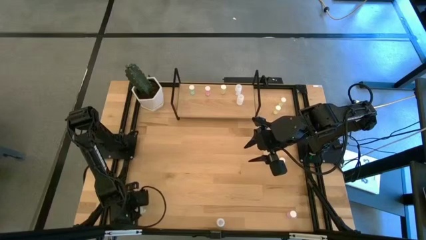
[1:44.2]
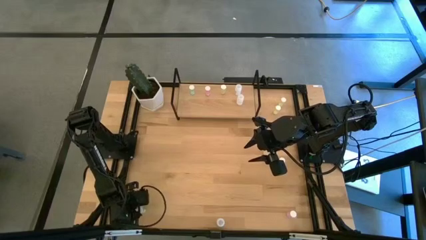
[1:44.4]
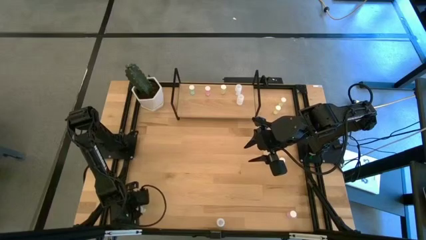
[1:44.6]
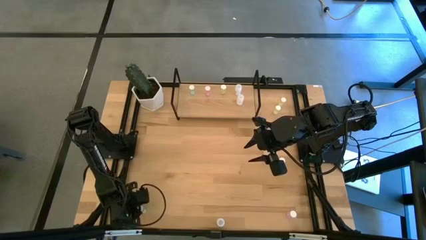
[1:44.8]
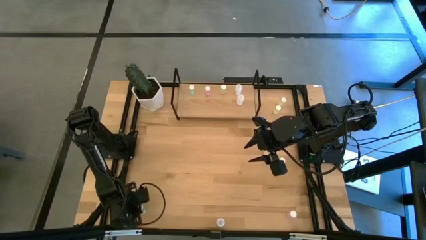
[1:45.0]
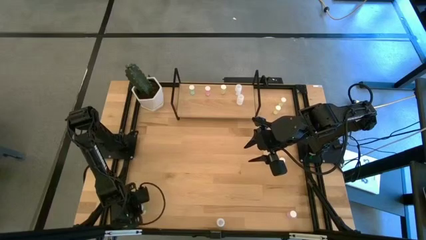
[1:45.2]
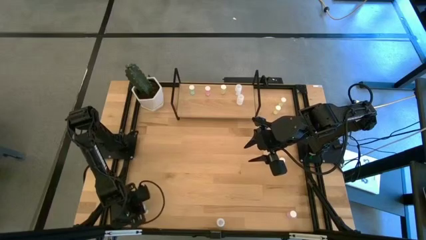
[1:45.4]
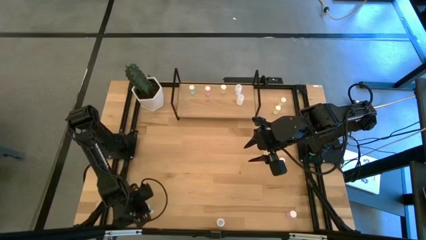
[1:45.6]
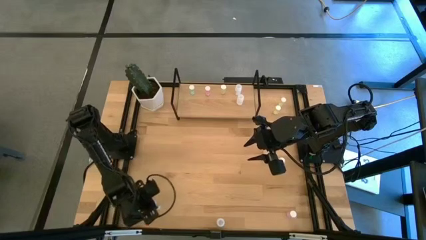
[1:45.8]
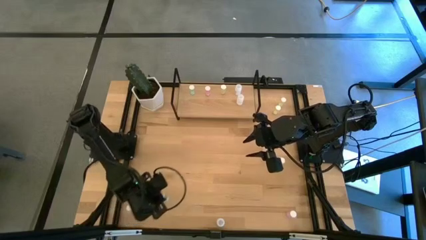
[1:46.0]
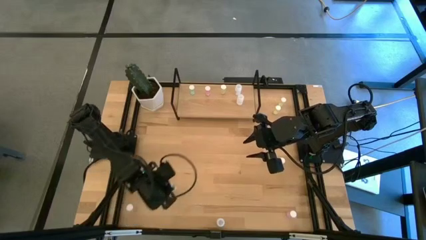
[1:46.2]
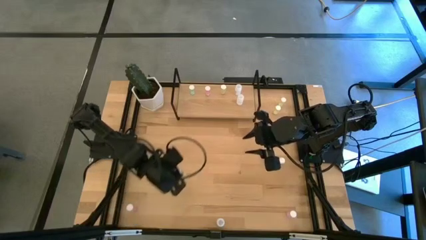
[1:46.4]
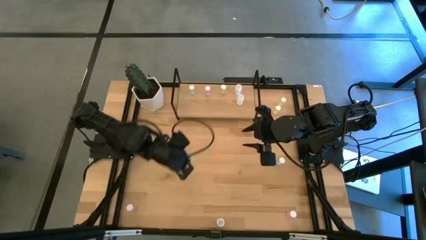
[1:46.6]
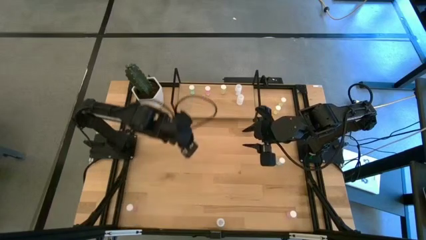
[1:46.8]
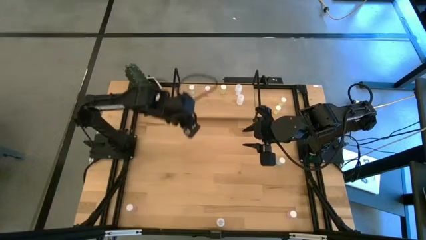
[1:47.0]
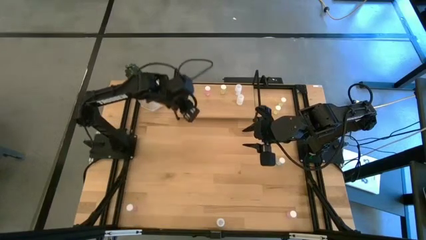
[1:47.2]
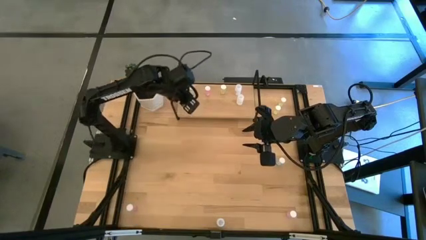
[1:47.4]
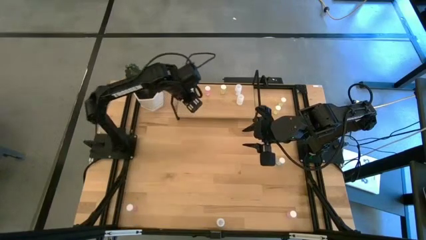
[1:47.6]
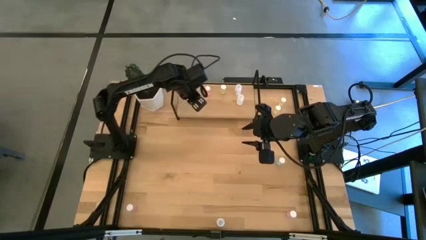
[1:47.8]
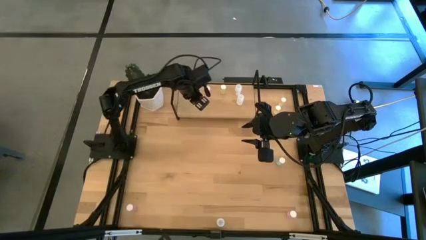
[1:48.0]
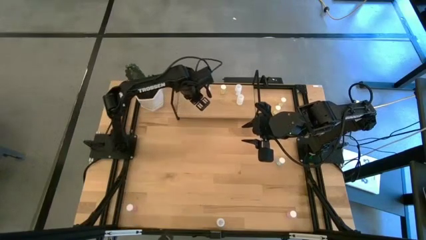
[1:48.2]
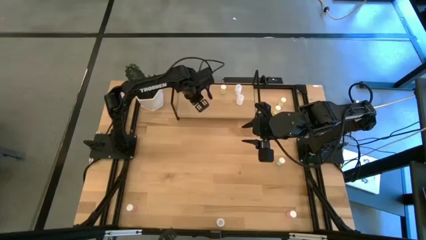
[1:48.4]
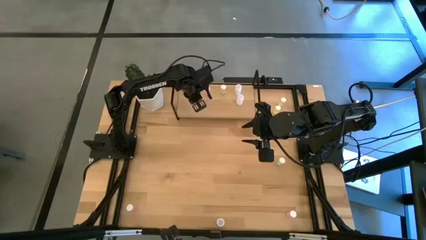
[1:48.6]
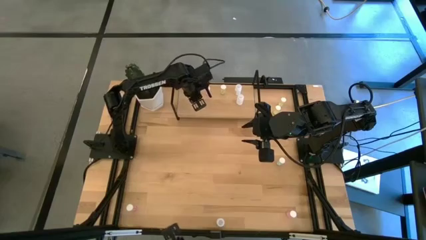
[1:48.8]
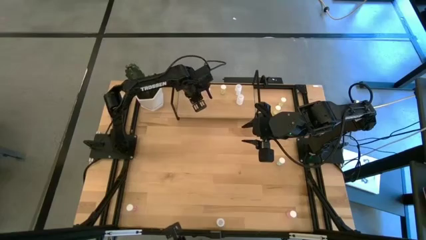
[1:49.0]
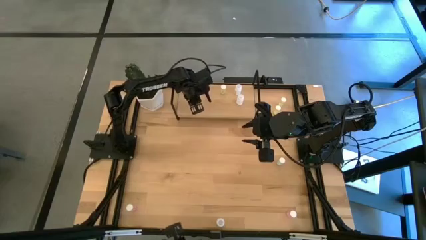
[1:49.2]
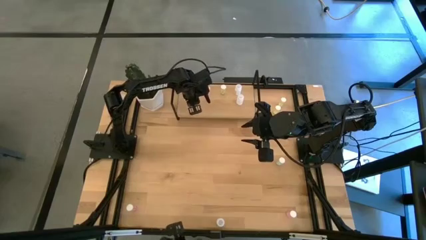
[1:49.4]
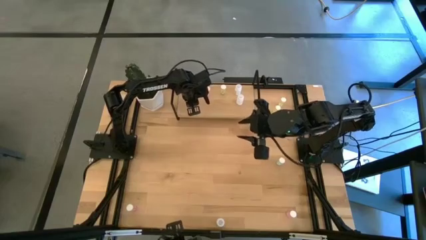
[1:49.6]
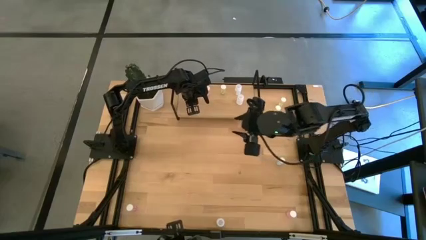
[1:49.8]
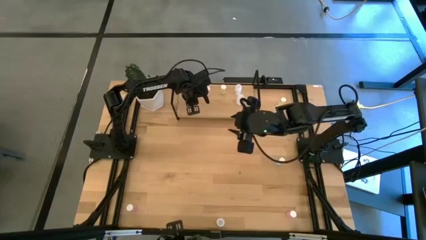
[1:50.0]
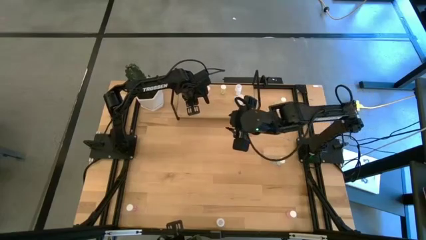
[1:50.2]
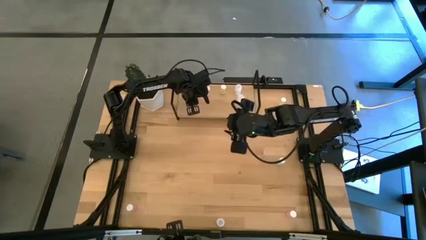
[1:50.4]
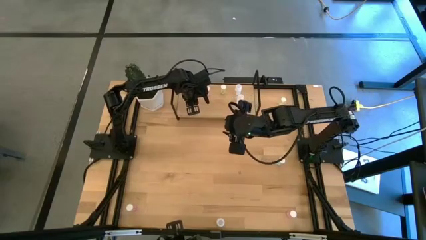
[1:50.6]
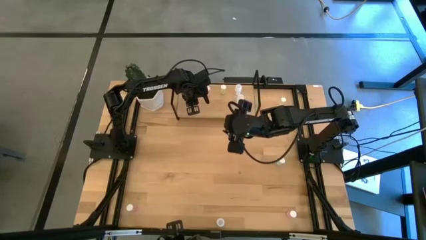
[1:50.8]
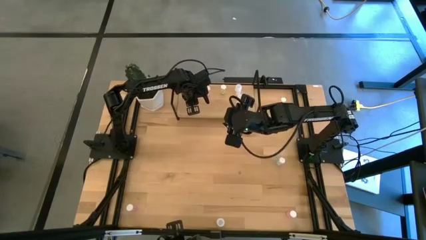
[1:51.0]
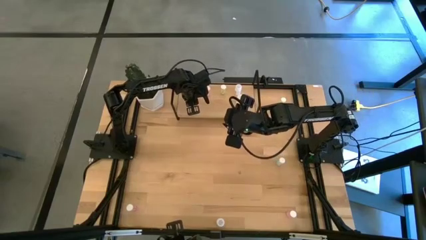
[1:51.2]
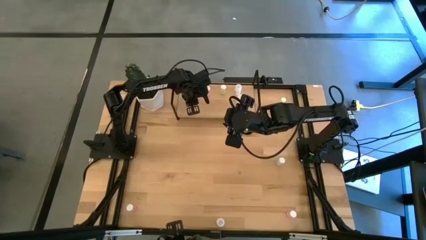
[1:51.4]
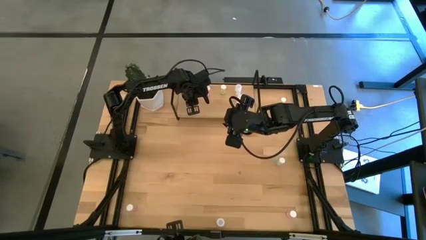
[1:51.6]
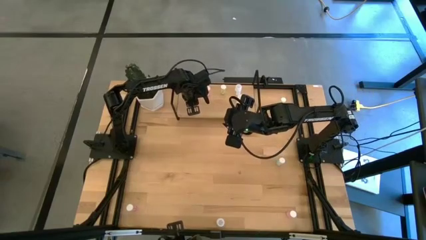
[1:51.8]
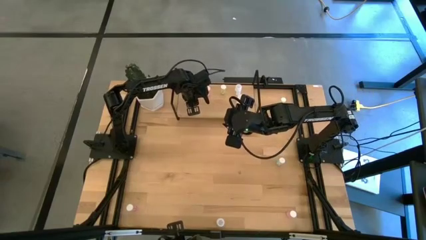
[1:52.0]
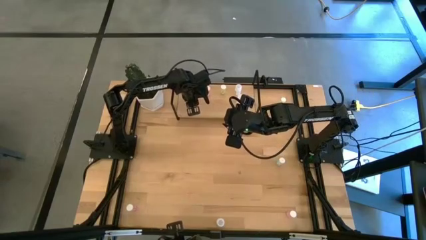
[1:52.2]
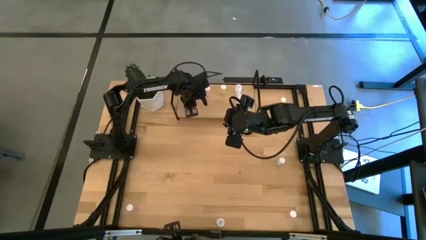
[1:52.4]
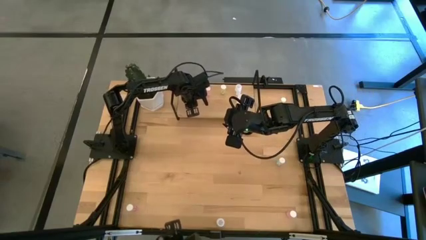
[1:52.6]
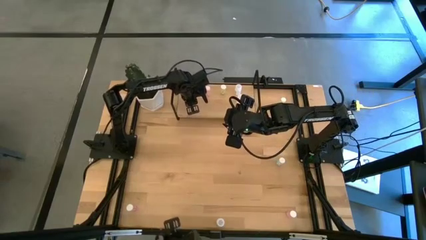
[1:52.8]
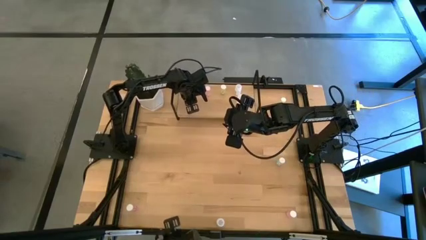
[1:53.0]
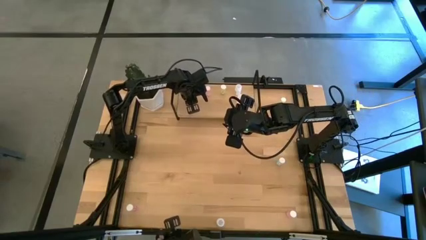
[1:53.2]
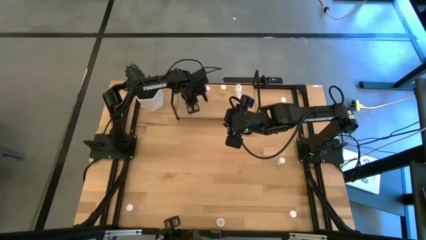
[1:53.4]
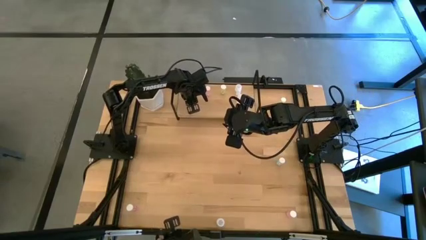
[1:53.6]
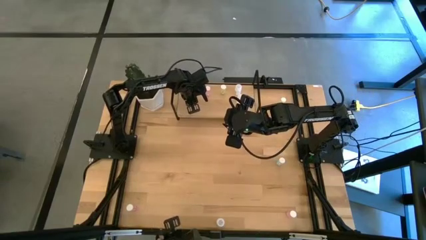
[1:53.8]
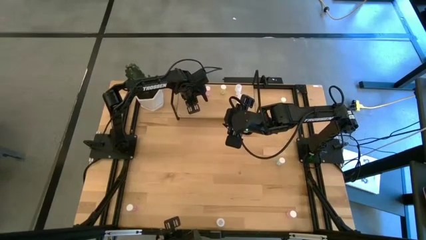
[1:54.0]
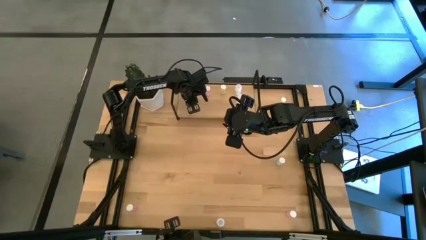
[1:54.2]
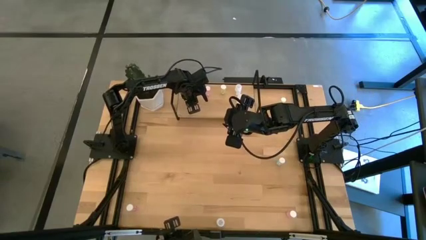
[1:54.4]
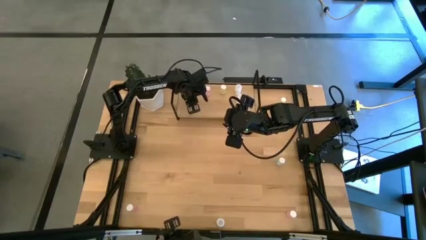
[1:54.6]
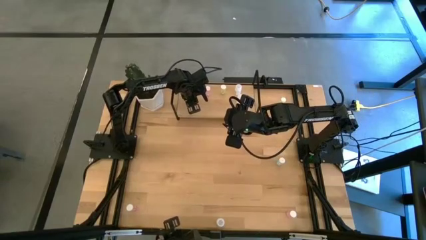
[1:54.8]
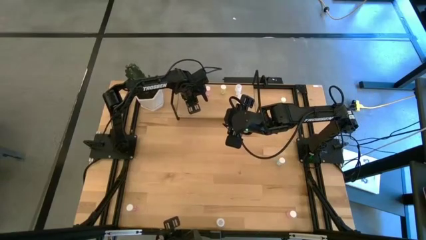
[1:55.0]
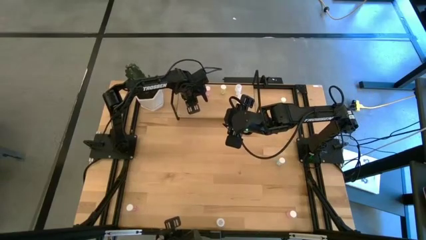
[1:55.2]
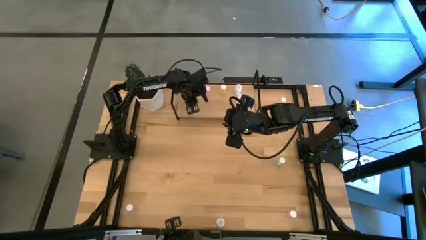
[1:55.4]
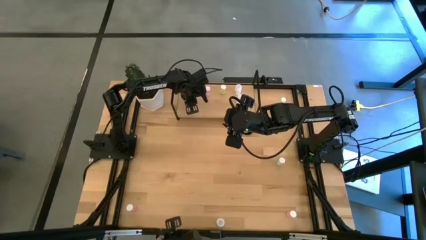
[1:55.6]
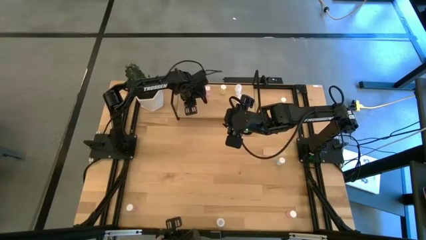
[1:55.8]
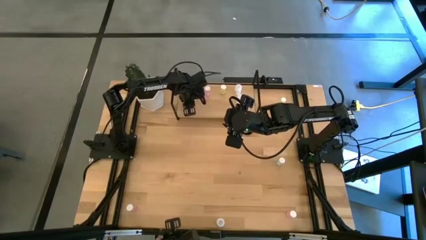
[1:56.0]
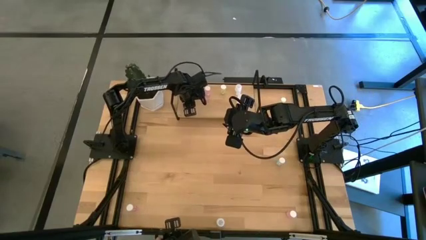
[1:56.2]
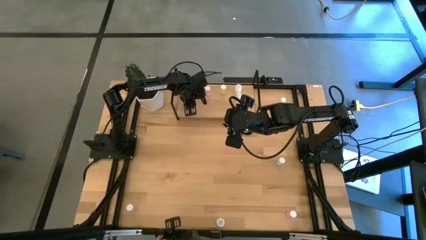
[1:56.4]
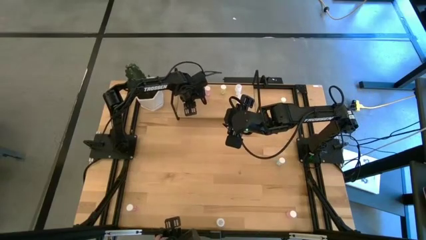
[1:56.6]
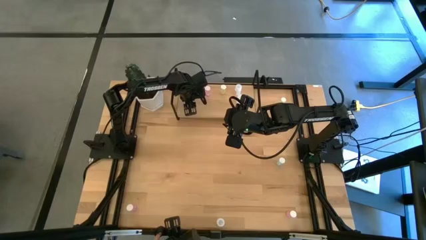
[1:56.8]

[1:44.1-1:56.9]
Task: Pick and place medicine bottles onto shelf by color
Put the bottom blue pill bottle on the shelf aligned with the other blue pill bottle

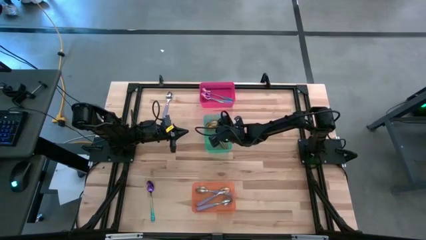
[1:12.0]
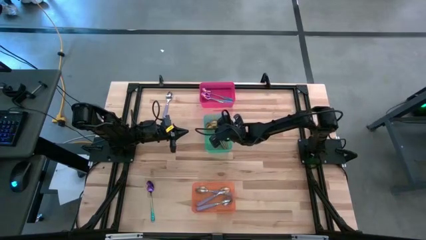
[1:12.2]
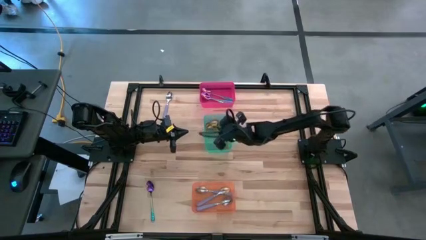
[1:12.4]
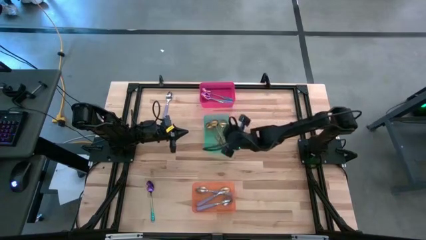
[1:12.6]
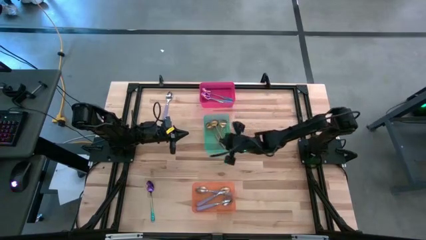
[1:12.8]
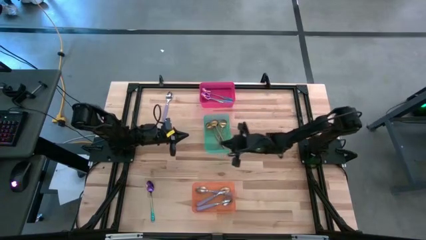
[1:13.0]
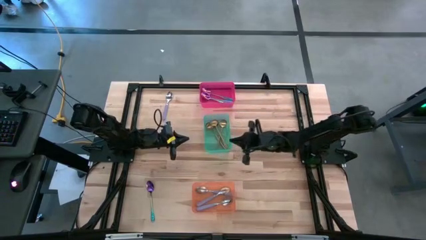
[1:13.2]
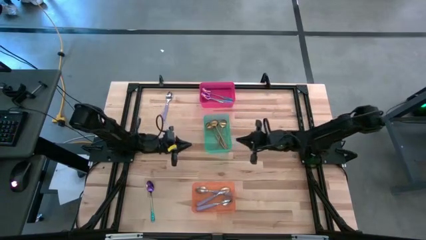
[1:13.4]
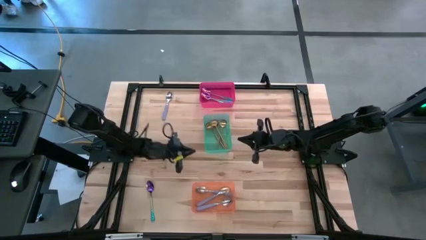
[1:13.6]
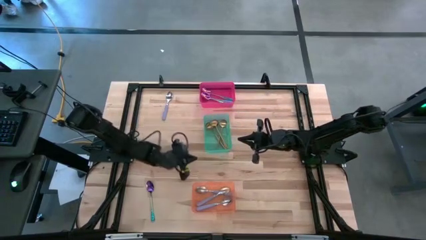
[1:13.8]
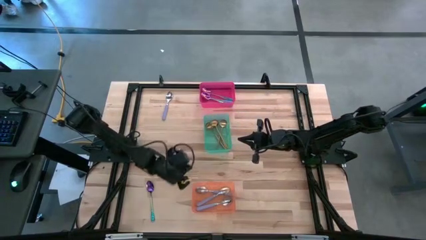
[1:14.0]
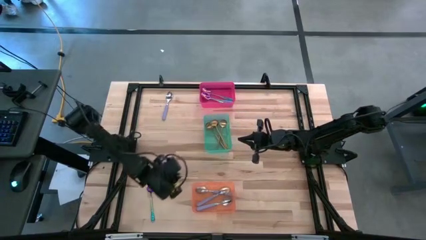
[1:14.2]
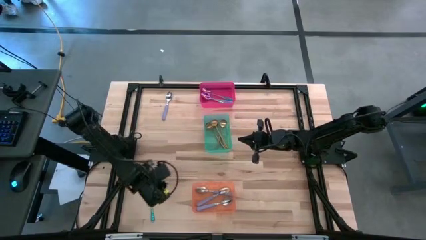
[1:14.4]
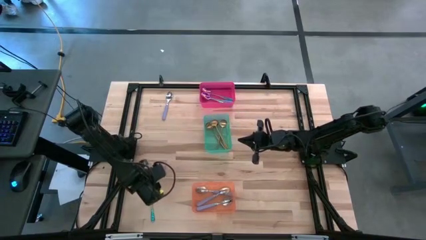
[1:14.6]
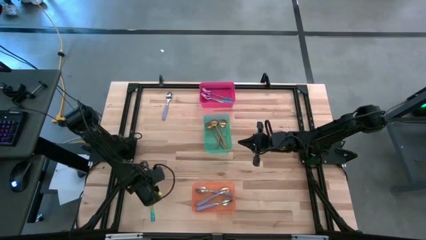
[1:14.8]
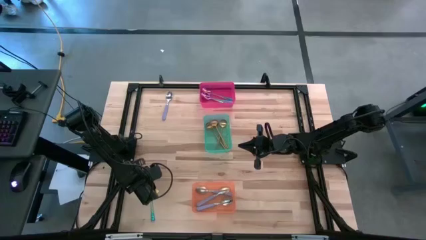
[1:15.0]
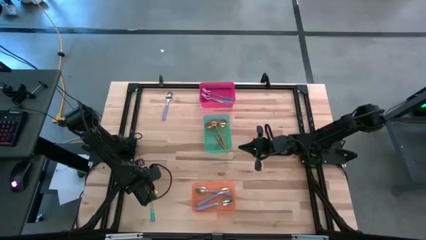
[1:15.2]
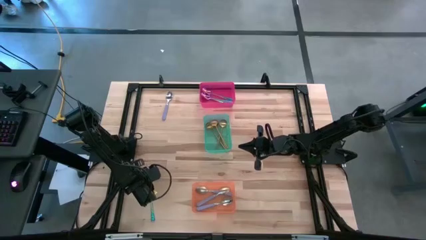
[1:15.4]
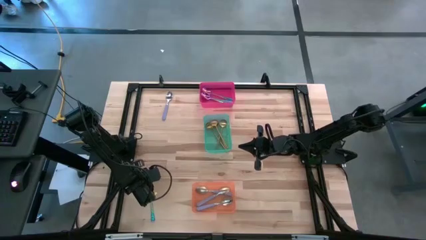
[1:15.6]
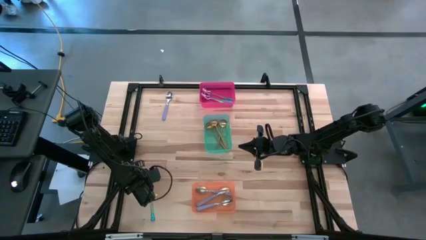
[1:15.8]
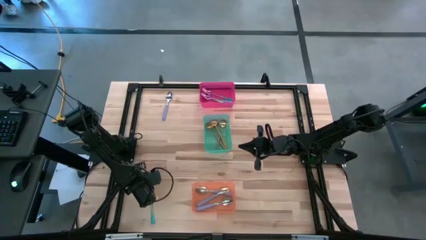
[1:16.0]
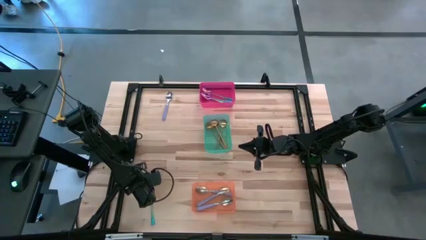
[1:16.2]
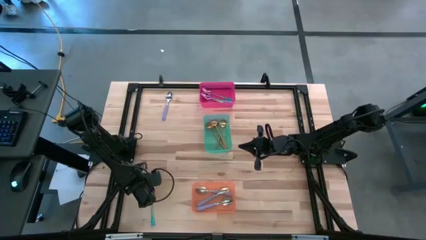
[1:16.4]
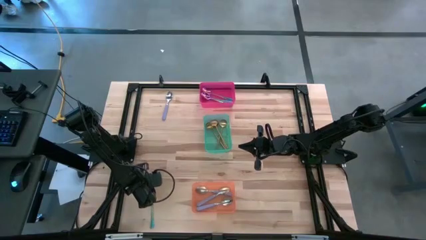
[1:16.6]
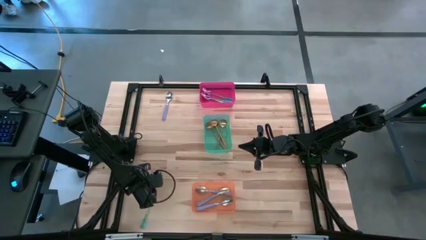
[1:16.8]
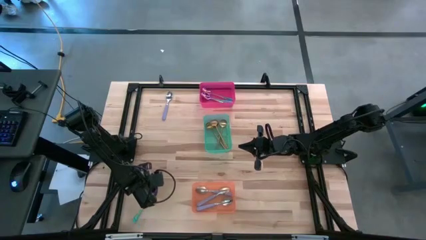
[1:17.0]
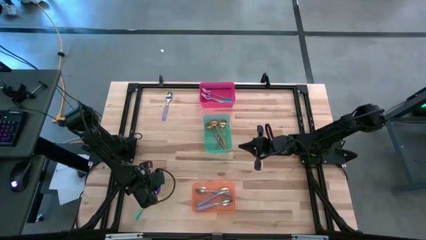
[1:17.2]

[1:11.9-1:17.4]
Task: Sort silverware by color (type)
Put the blue spoon into the red bin
